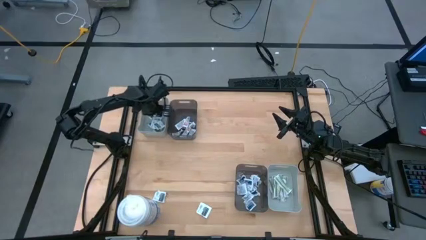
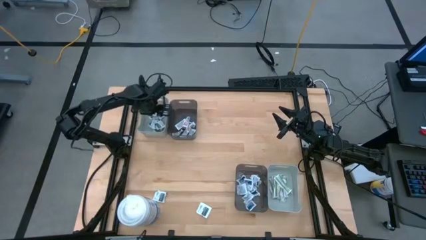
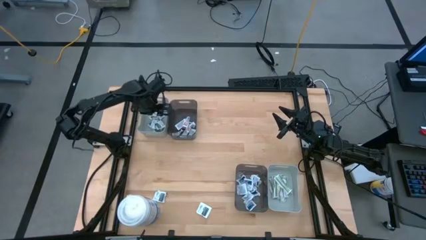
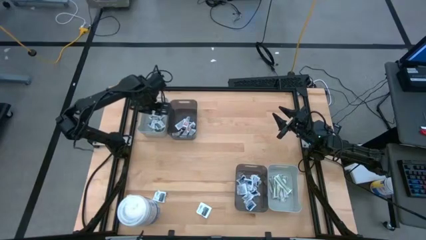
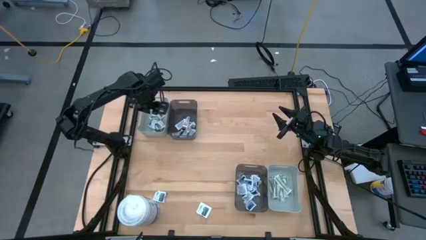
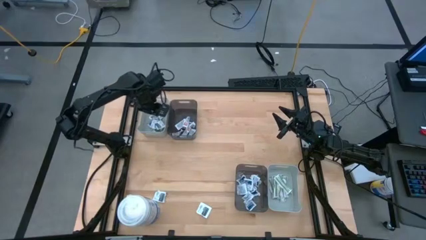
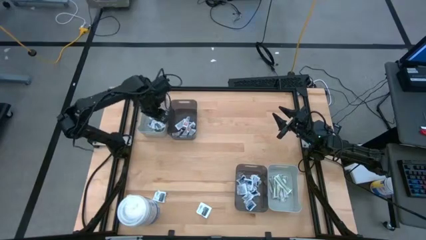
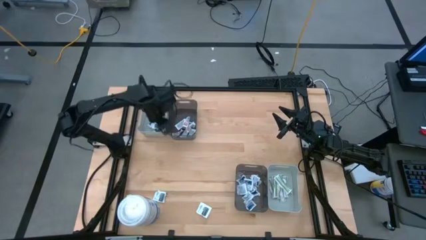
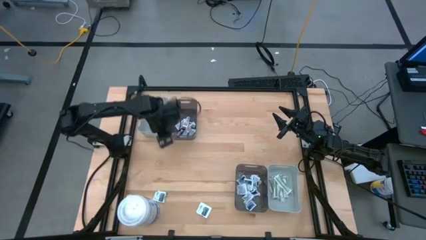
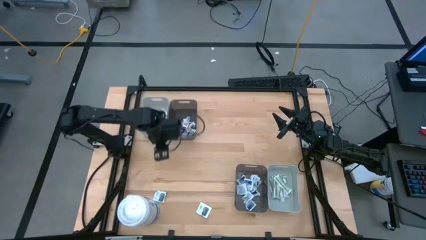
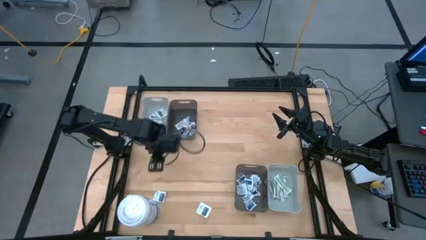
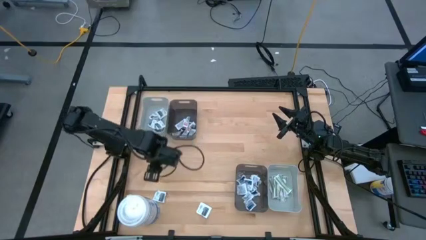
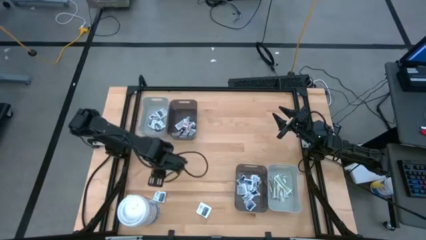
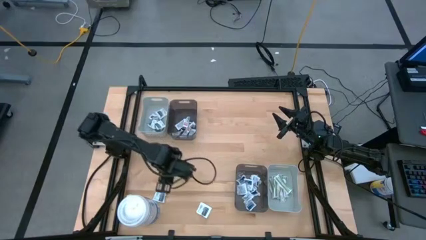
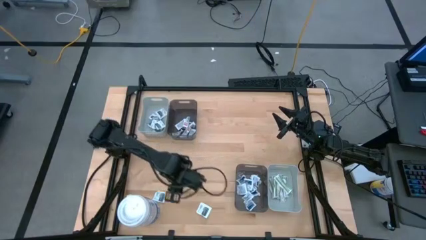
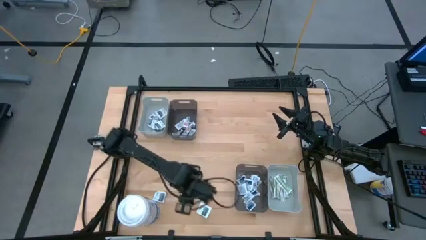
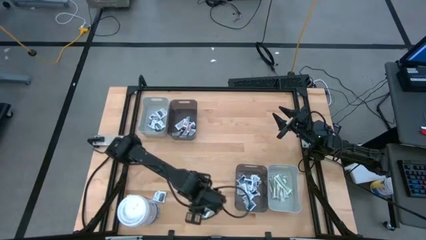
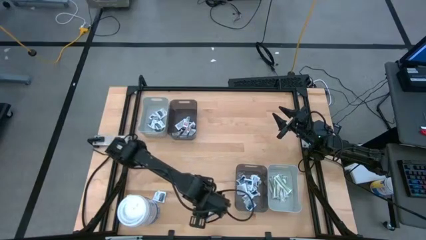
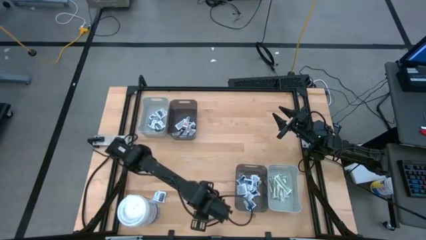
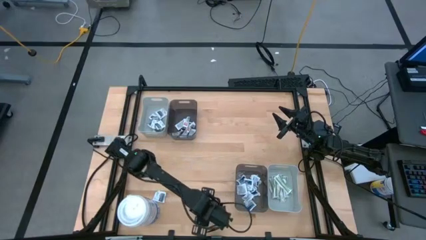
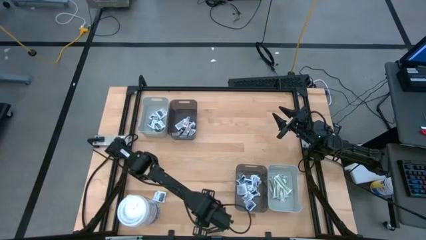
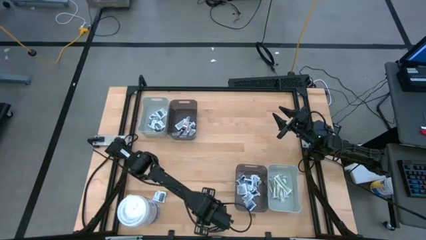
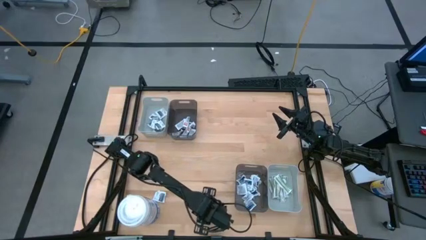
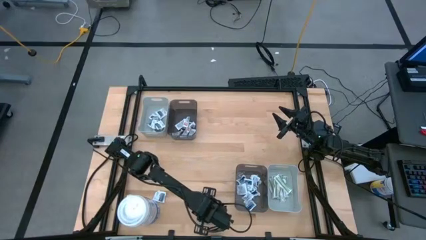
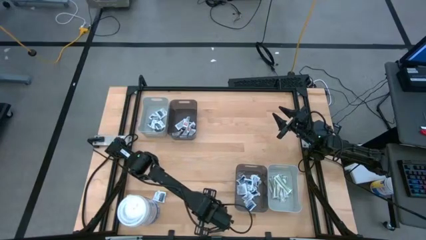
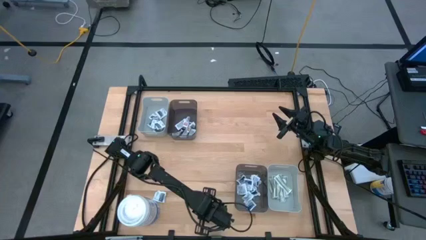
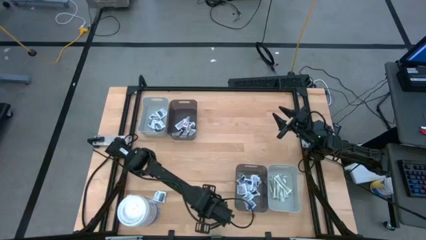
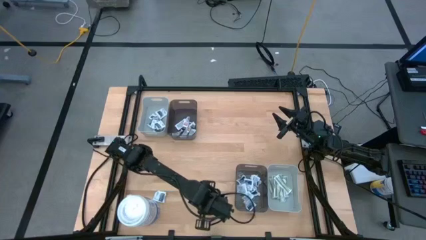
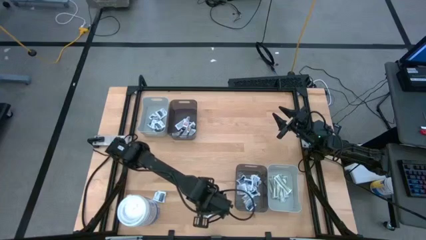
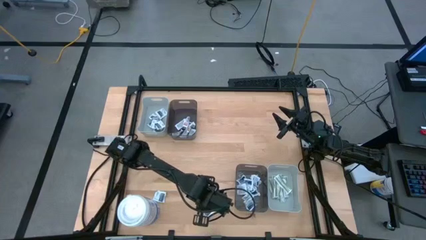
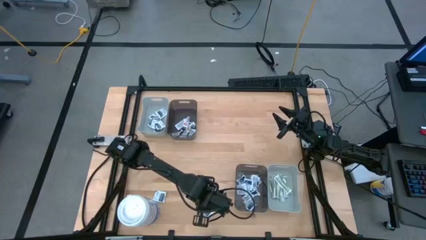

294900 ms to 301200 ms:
Task: Pick & Place First Aid Supplies
Put the white towelette pack into the top gray bin

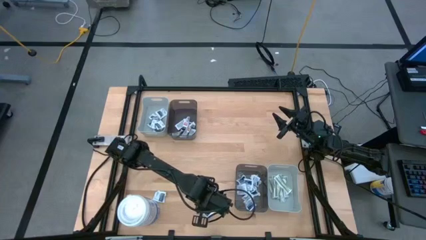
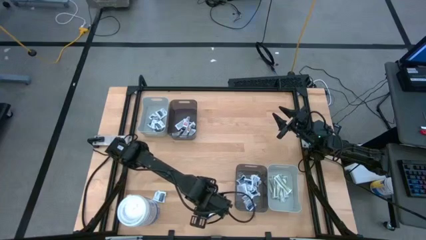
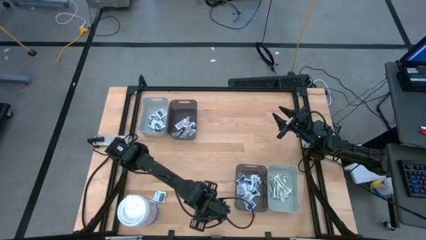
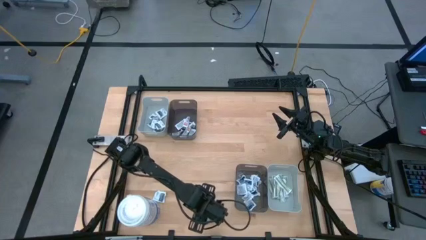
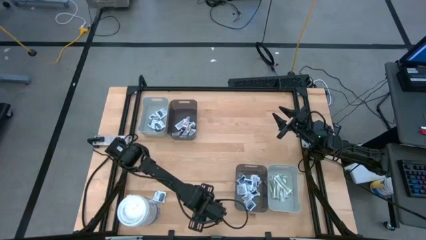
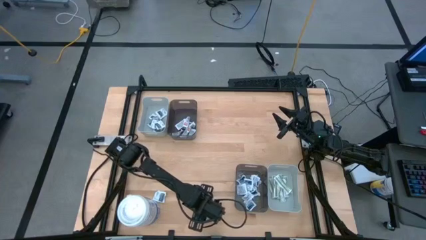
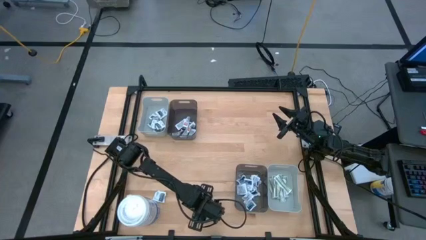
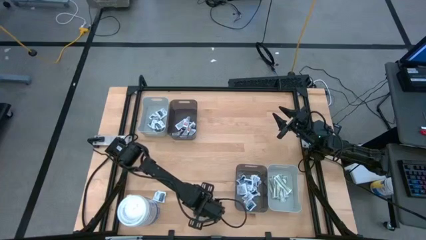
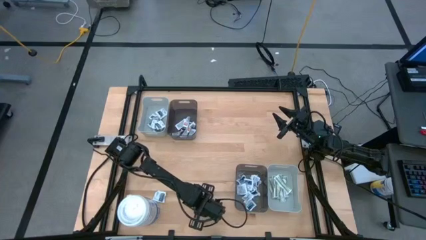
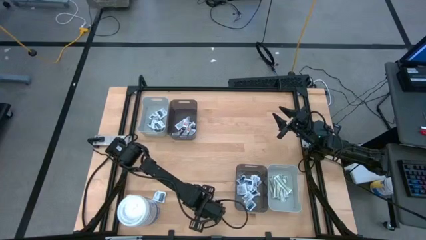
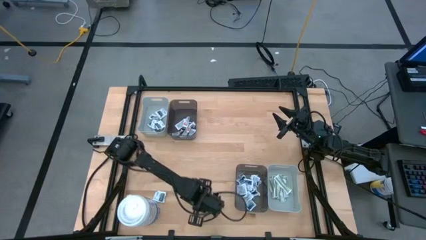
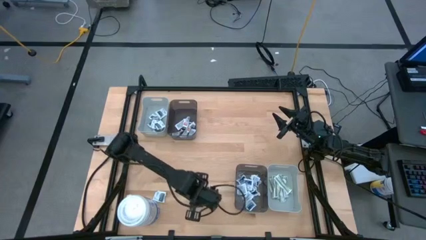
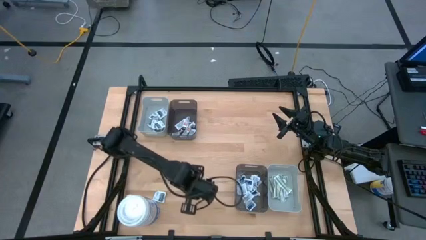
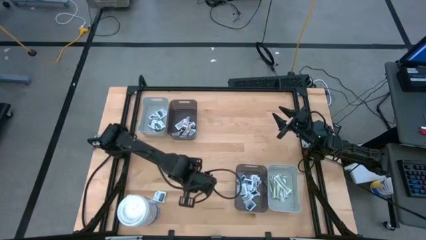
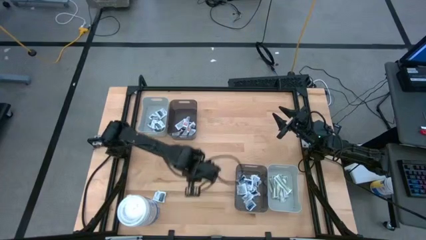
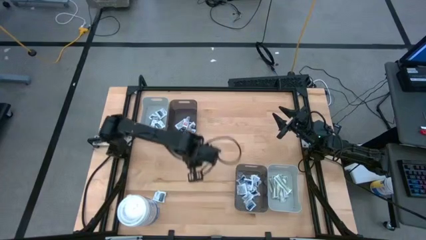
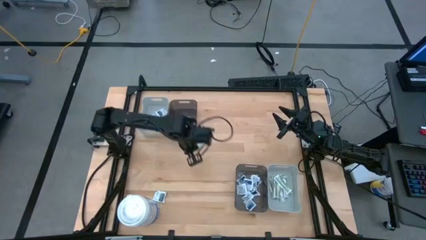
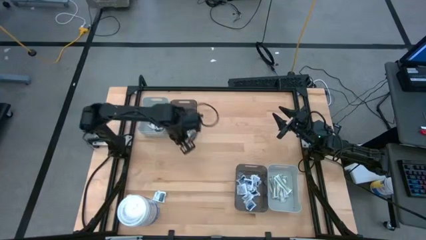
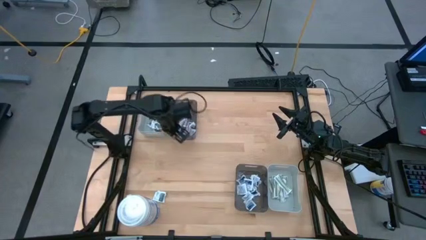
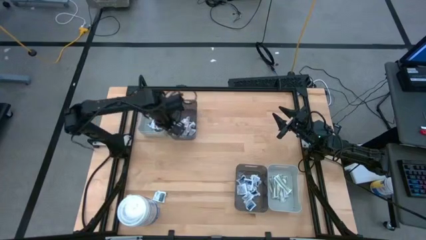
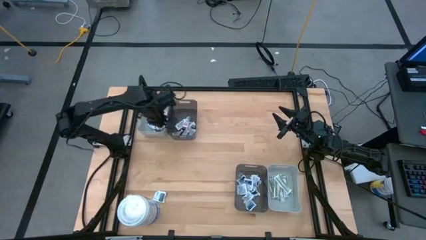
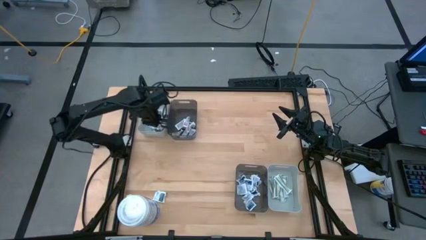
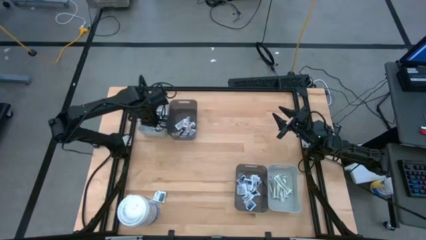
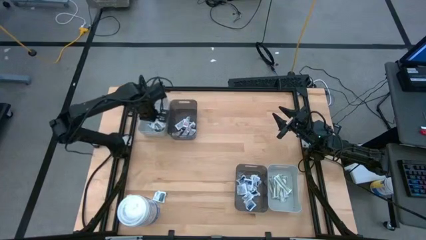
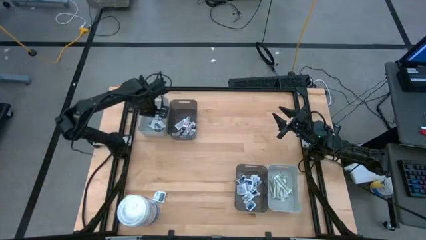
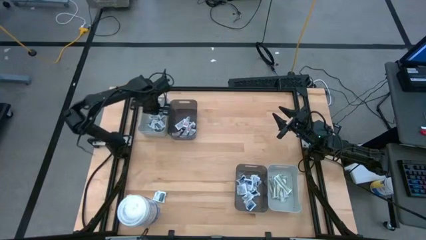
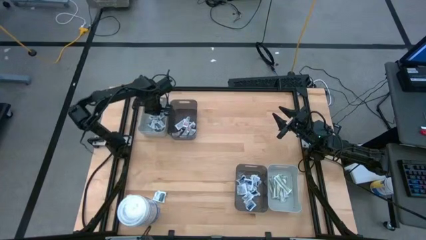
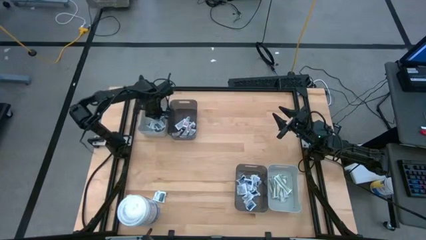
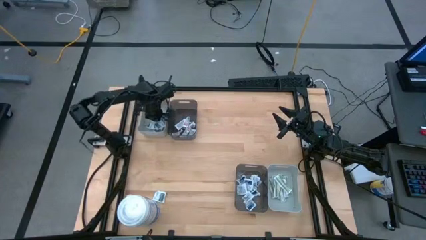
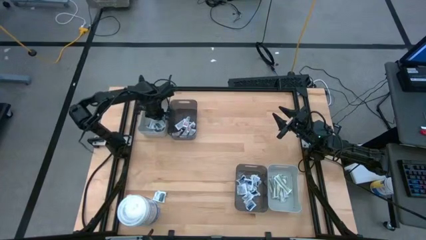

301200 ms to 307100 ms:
Put the white towelette pack into the top gray bin
